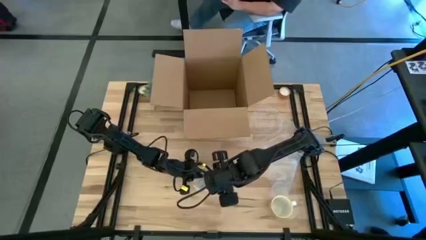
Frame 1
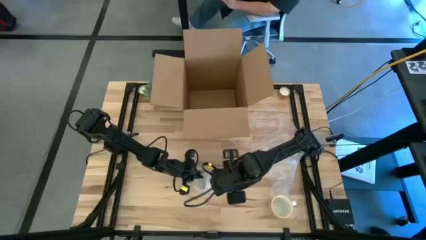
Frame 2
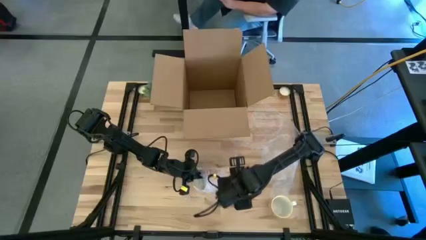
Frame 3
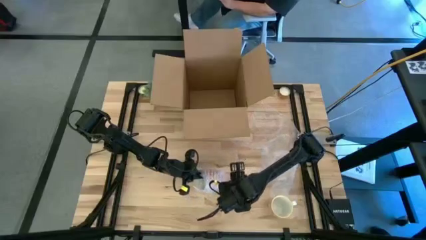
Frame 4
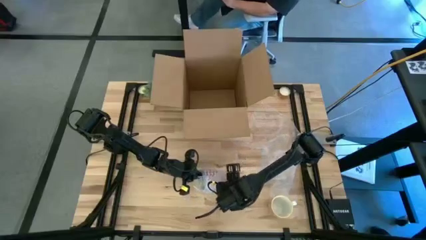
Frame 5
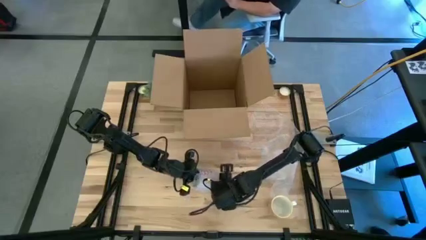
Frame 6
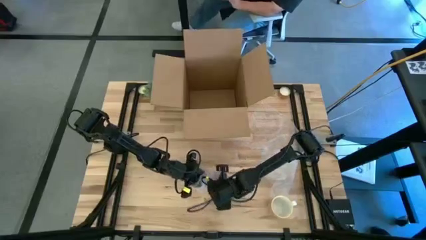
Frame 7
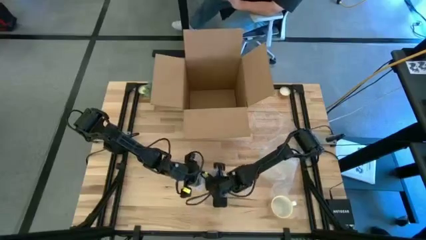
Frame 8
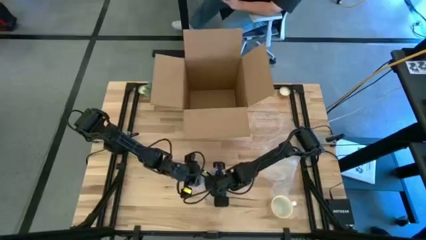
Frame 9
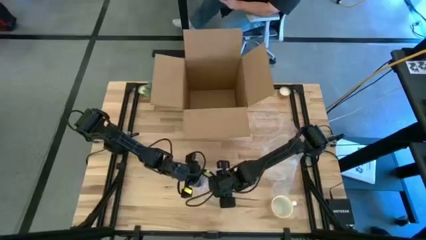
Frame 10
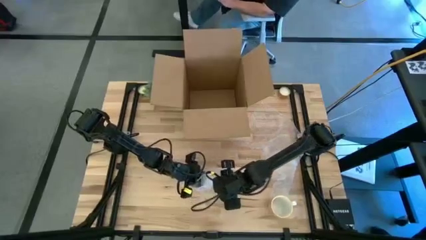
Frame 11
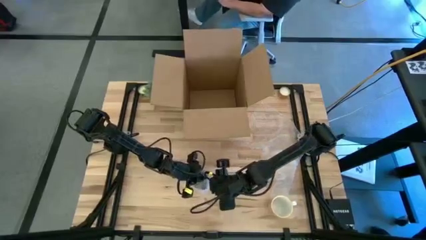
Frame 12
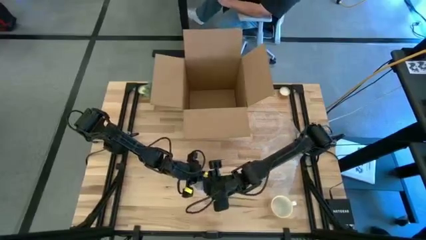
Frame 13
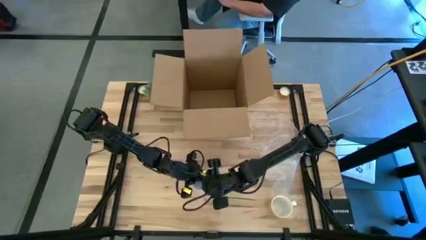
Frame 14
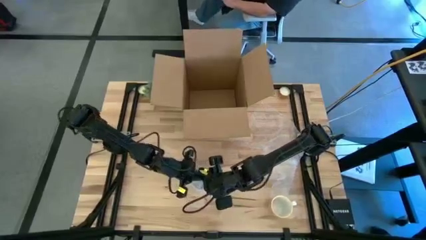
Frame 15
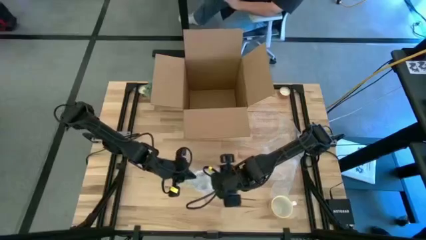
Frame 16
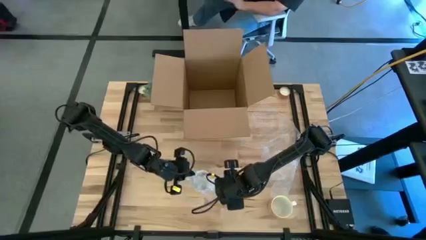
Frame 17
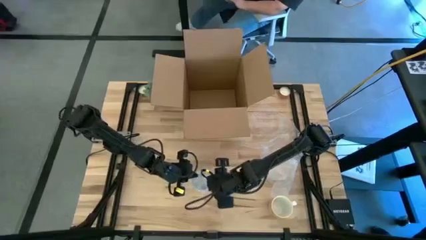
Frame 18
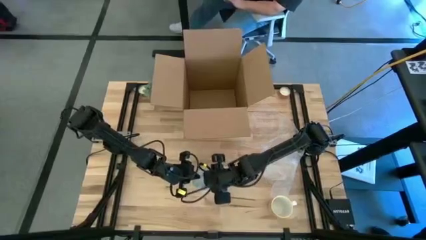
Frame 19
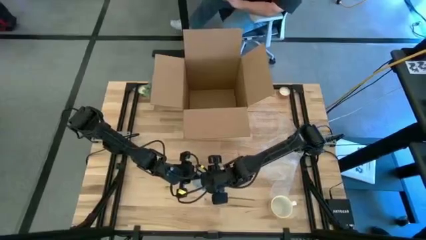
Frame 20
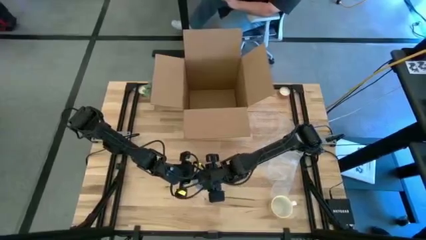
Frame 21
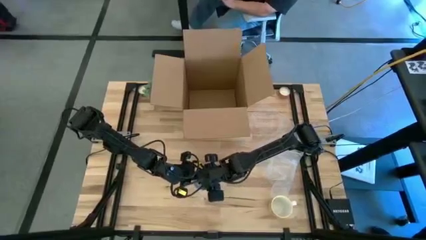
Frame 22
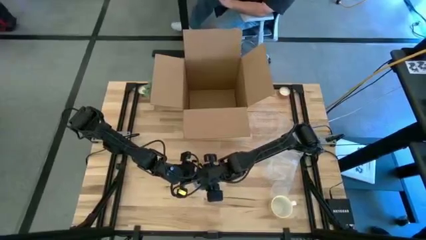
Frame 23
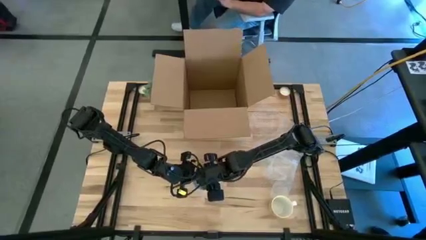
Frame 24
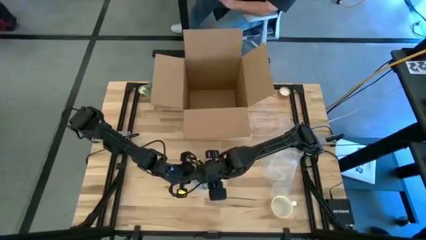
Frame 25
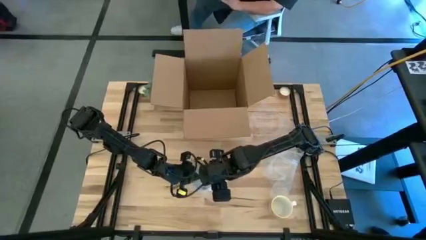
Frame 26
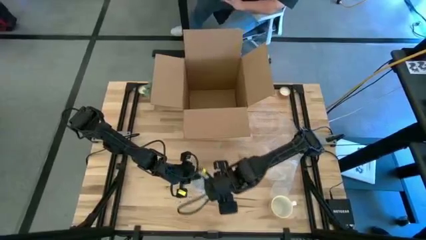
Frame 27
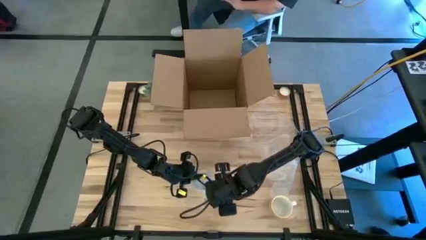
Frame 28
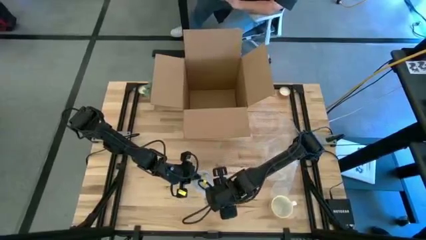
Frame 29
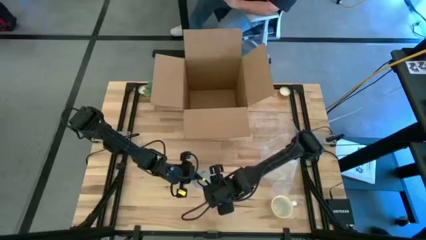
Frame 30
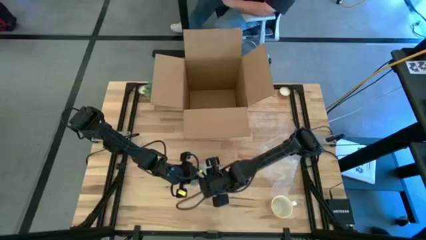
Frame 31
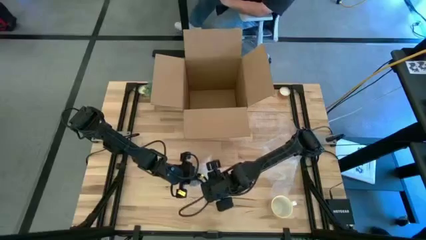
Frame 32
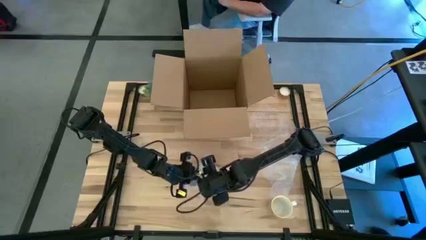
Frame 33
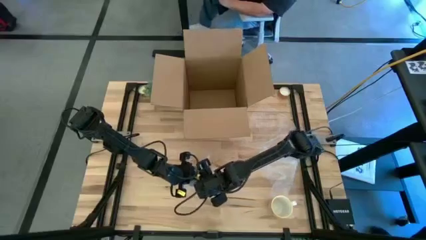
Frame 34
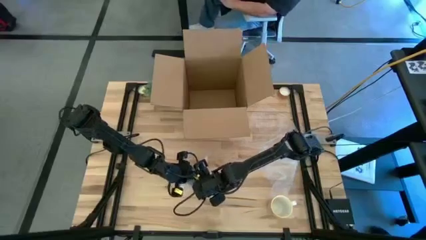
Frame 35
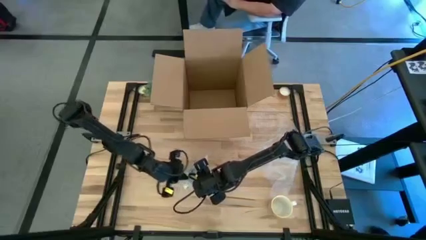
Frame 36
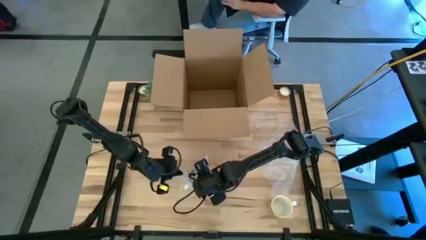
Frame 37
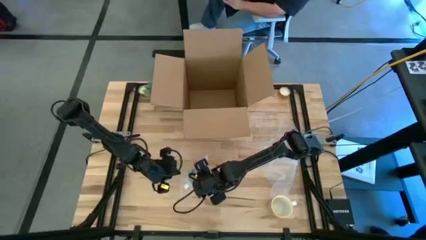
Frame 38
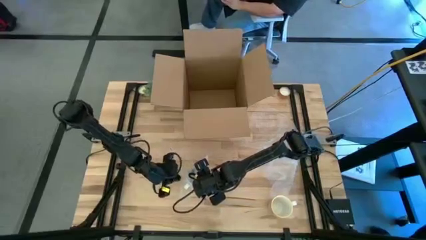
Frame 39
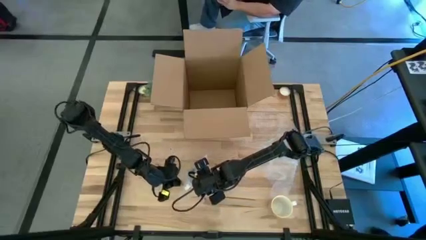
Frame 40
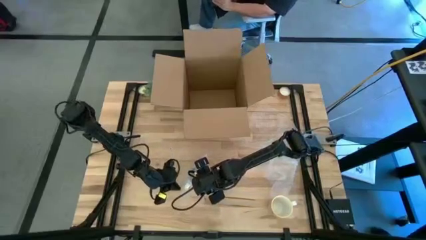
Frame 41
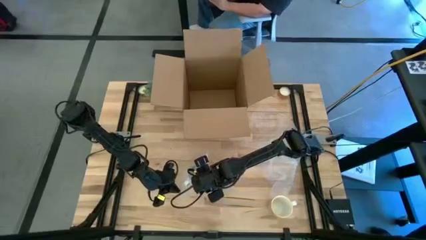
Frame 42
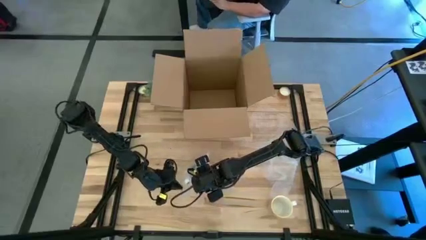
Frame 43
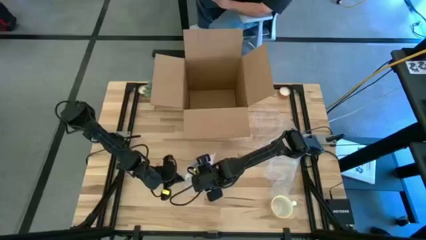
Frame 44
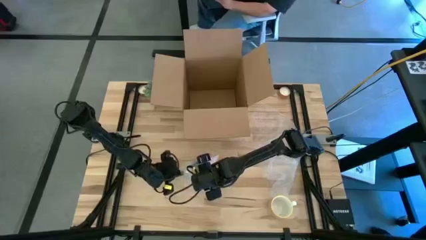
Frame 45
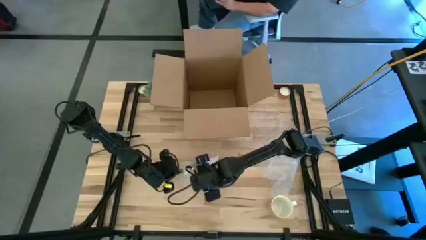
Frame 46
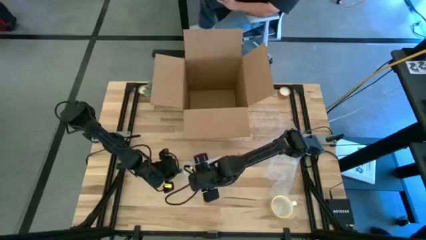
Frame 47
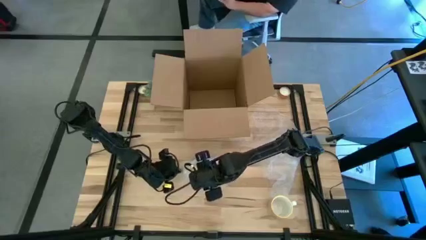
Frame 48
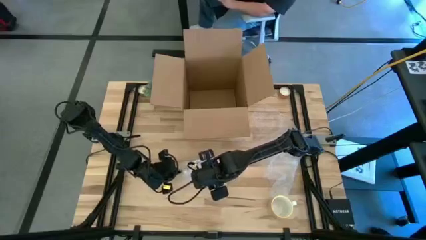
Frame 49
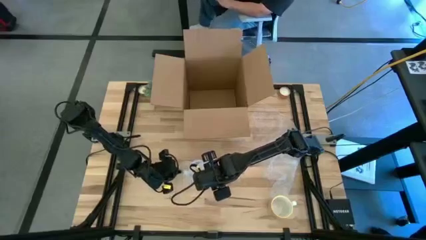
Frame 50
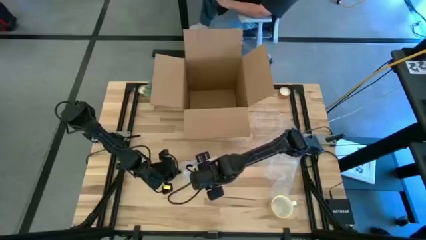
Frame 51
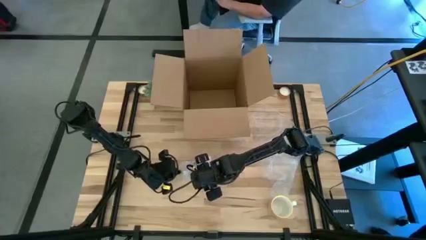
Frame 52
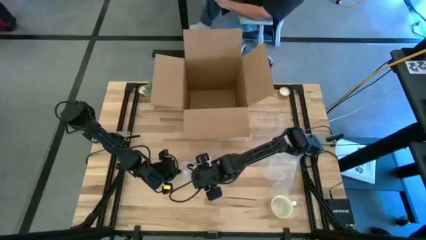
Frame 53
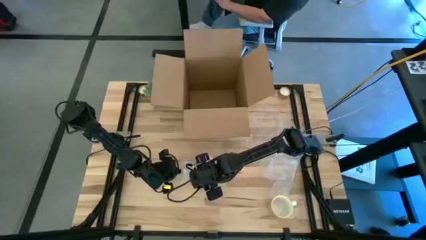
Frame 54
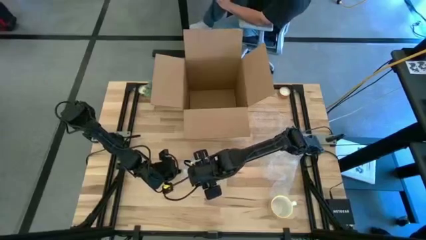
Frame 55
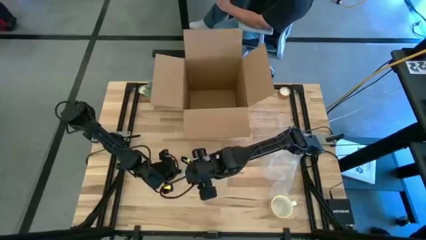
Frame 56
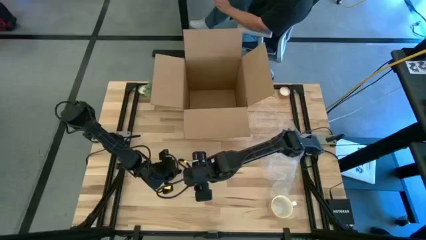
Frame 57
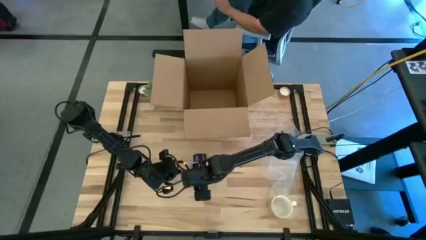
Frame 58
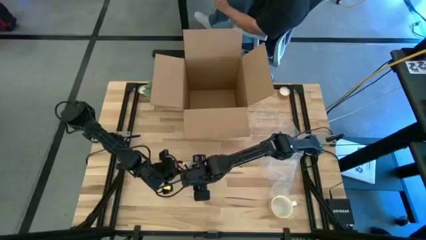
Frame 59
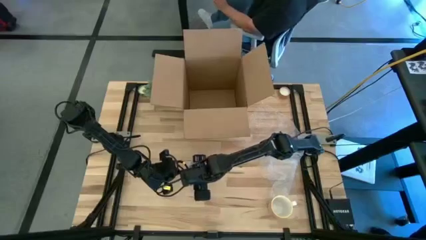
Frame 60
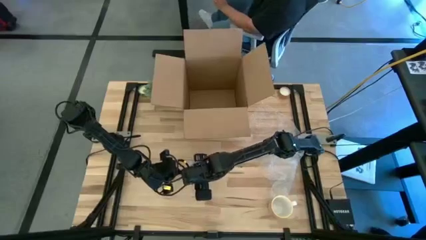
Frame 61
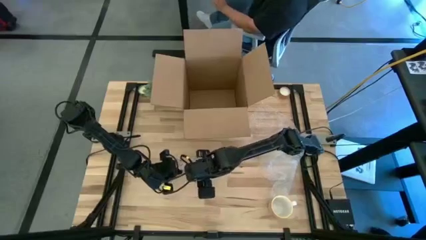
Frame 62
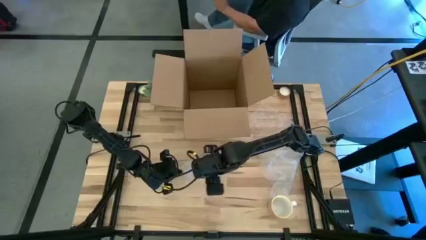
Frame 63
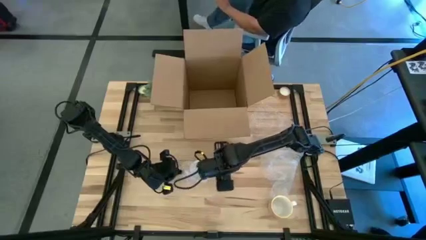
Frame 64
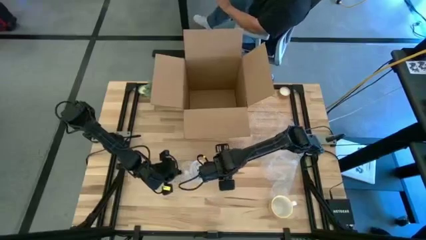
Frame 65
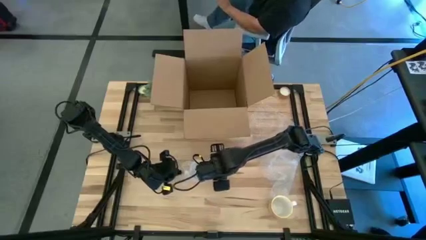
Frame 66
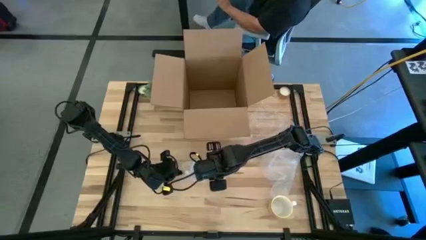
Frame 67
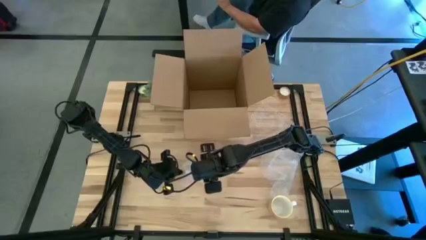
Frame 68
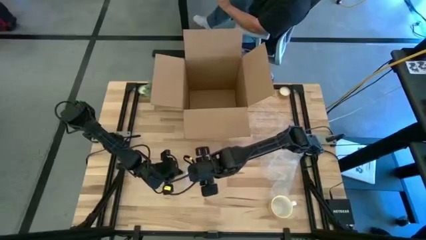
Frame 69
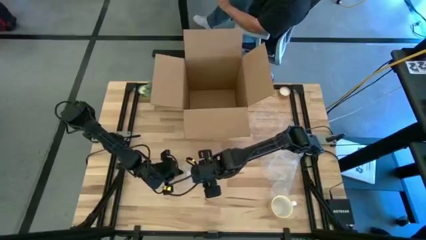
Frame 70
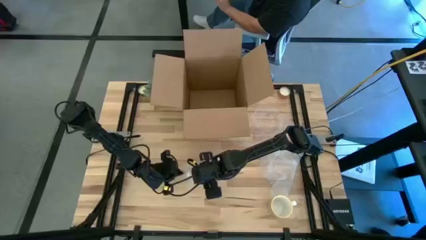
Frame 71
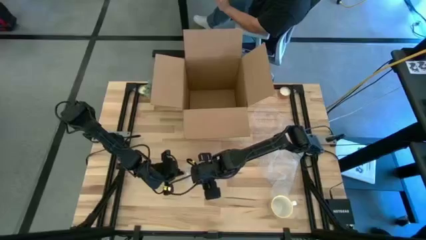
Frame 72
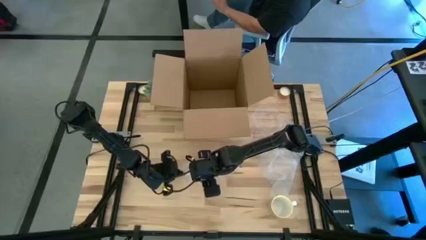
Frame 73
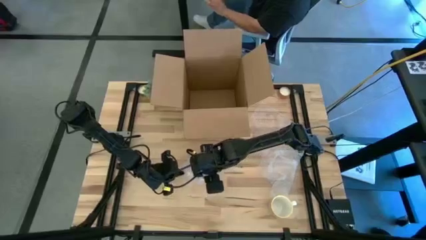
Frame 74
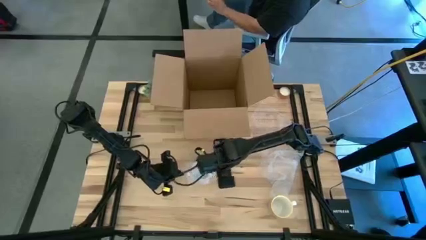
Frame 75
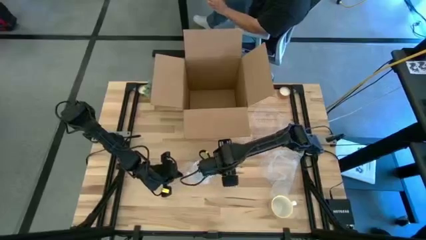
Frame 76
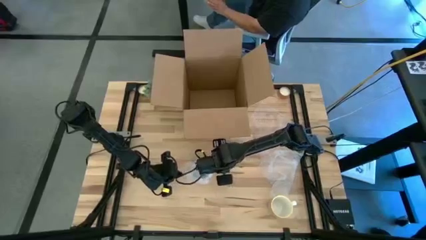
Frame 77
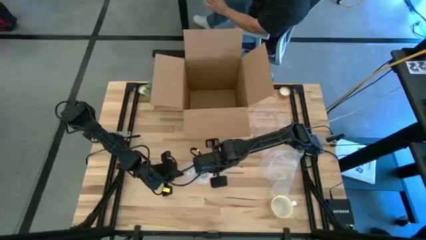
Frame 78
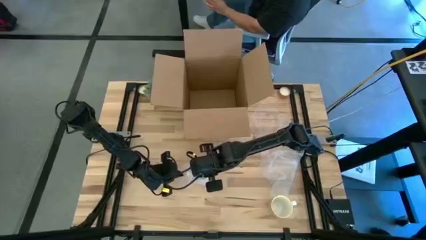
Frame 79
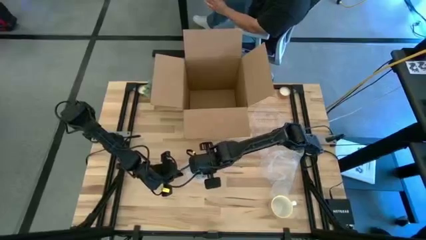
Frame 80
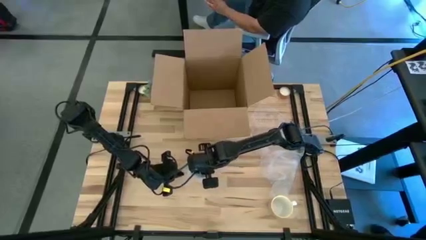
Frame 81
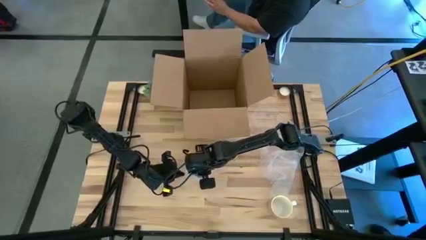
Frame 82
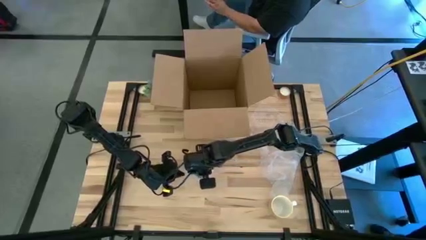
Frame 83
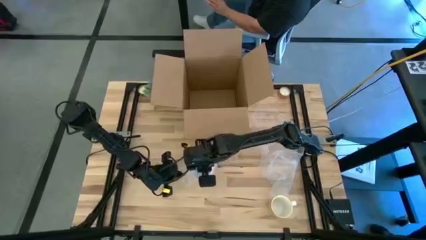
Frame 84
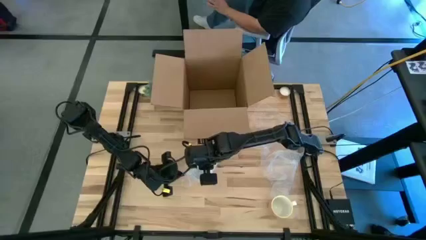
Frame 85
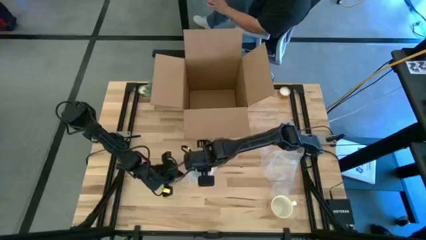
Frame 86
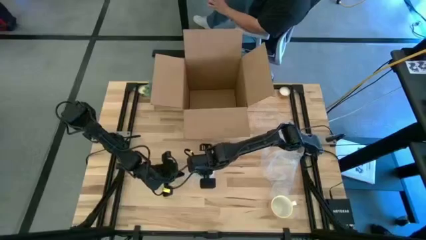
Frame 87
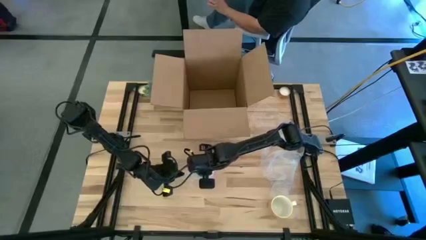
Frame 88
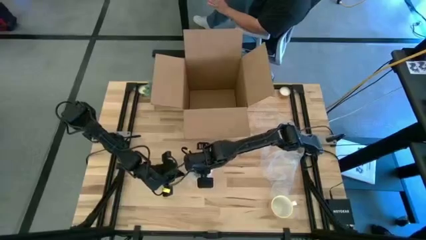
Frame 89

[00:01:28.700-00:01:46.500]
Task: wrap mug
Wrap the red mug with the bubble wrap
